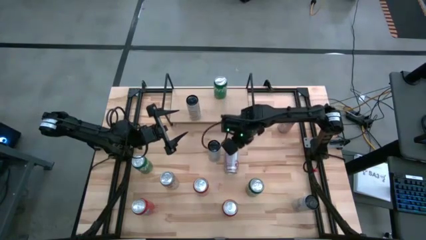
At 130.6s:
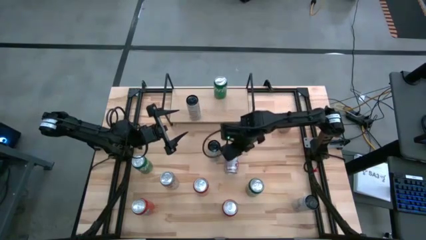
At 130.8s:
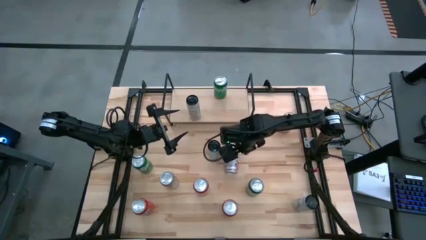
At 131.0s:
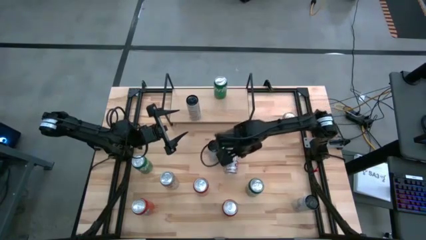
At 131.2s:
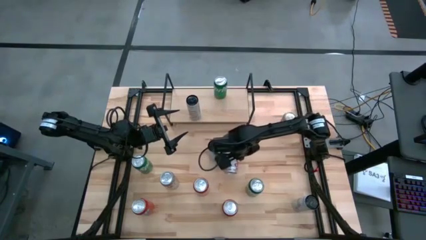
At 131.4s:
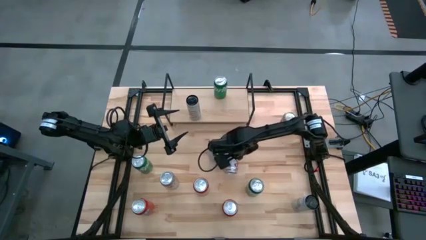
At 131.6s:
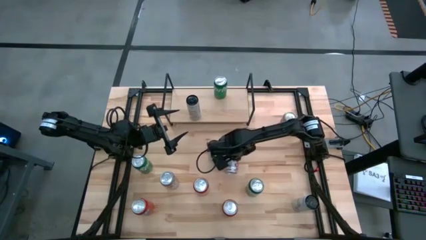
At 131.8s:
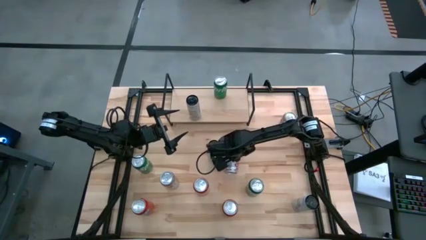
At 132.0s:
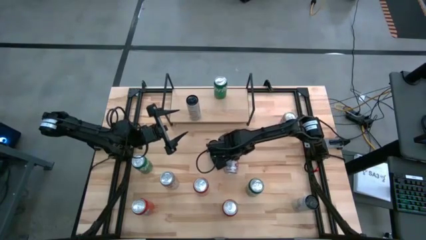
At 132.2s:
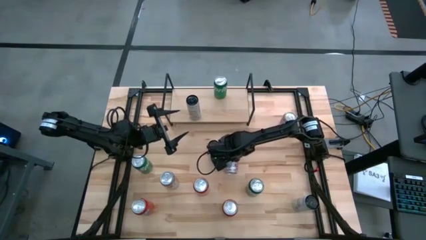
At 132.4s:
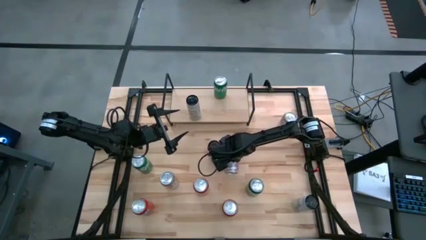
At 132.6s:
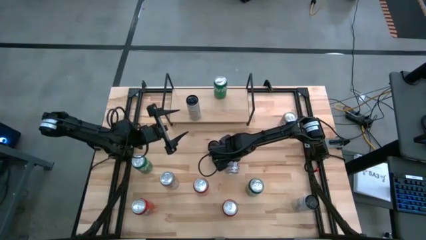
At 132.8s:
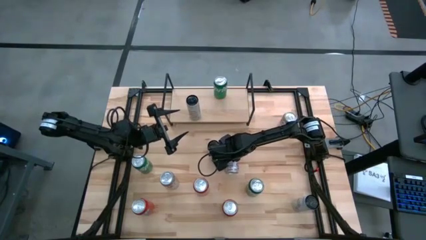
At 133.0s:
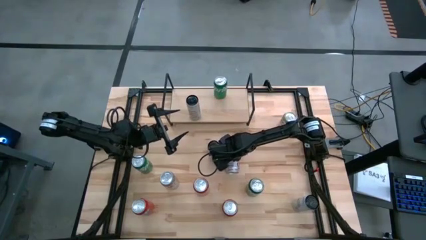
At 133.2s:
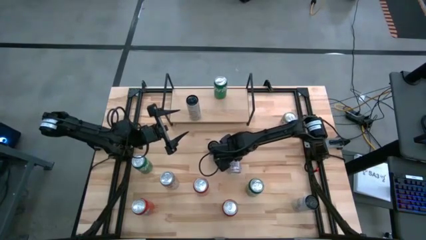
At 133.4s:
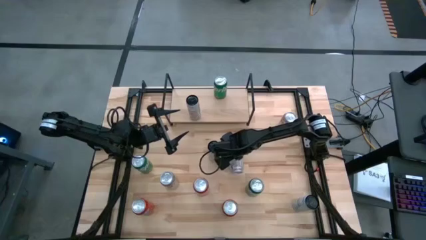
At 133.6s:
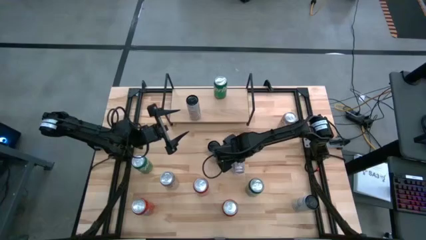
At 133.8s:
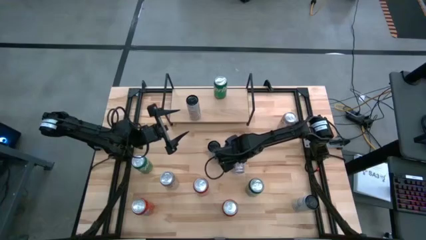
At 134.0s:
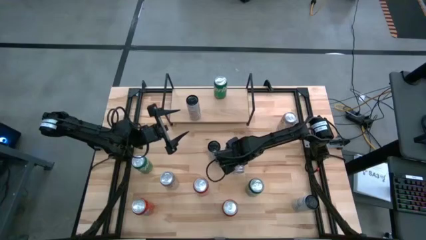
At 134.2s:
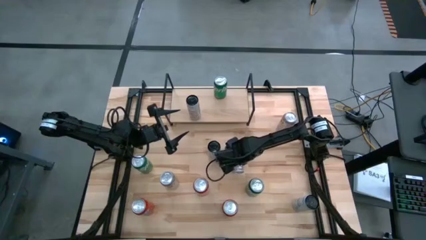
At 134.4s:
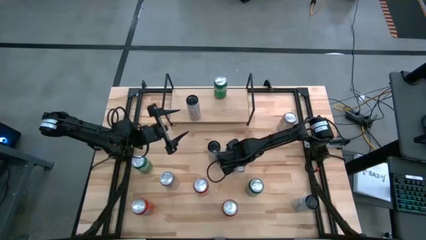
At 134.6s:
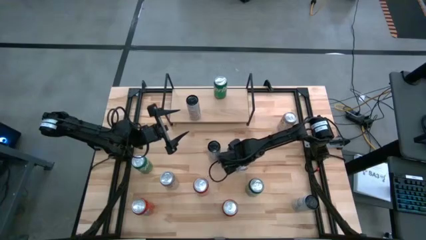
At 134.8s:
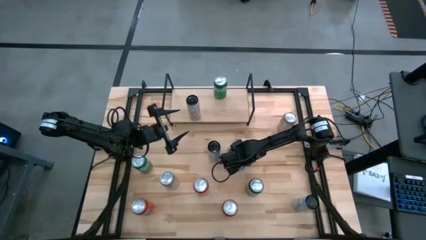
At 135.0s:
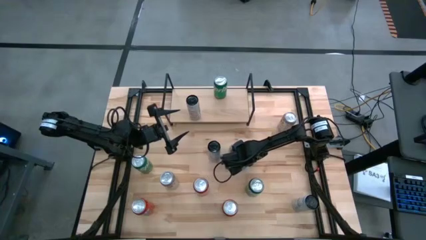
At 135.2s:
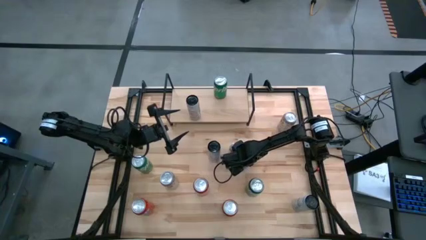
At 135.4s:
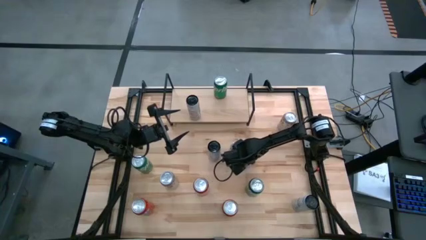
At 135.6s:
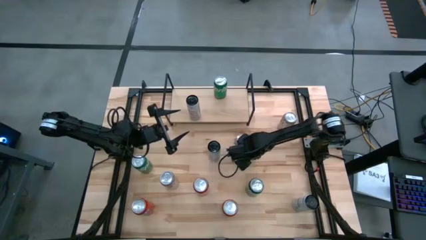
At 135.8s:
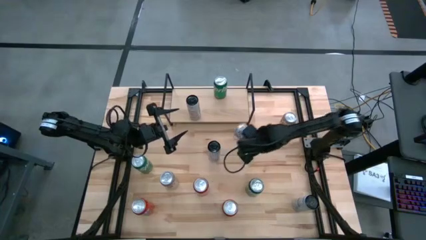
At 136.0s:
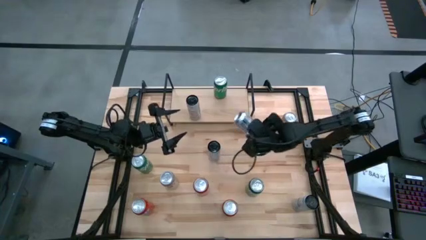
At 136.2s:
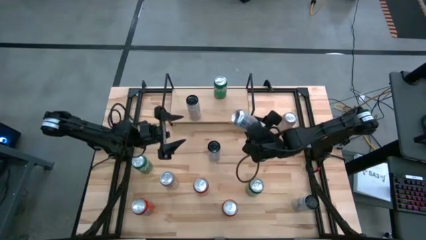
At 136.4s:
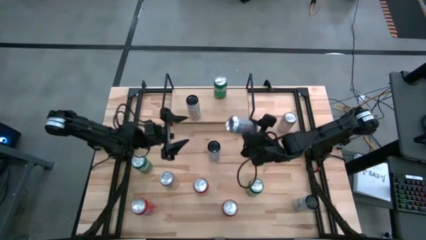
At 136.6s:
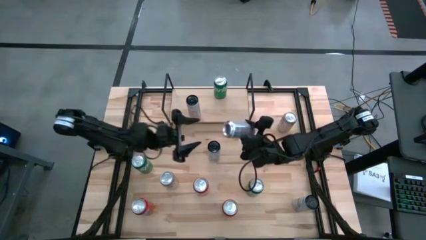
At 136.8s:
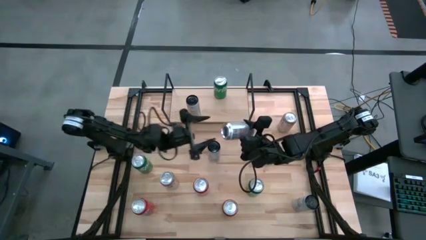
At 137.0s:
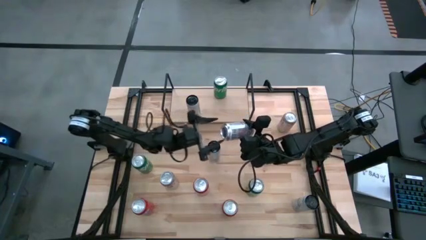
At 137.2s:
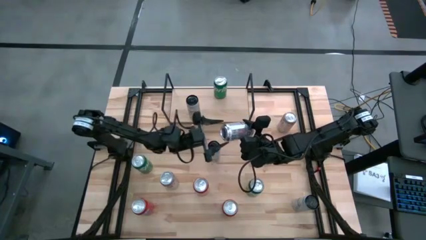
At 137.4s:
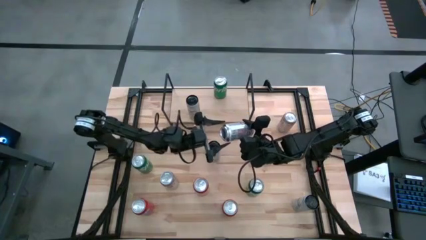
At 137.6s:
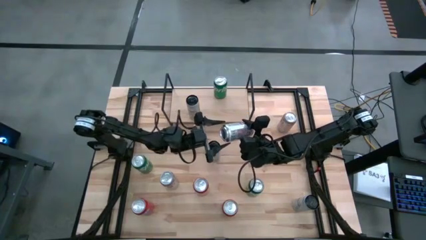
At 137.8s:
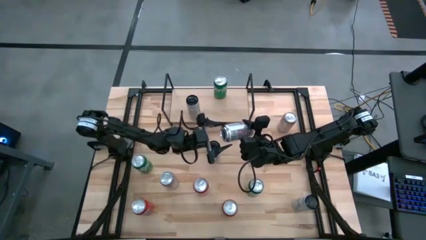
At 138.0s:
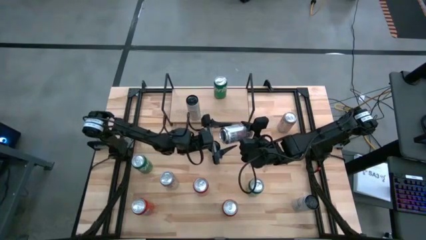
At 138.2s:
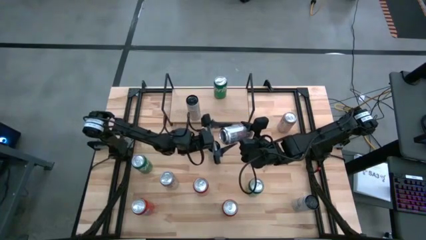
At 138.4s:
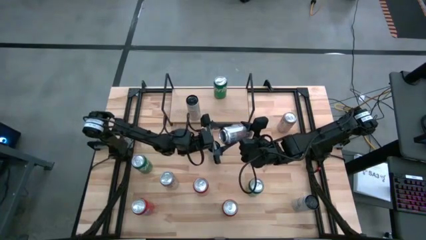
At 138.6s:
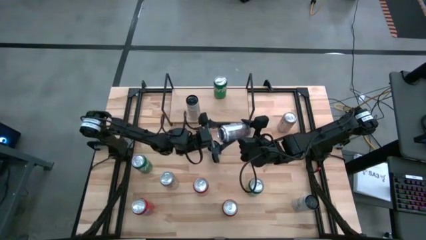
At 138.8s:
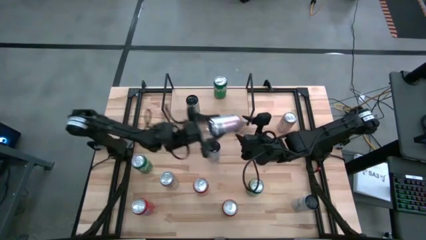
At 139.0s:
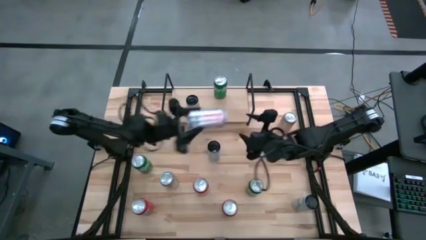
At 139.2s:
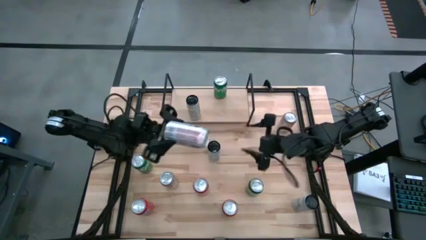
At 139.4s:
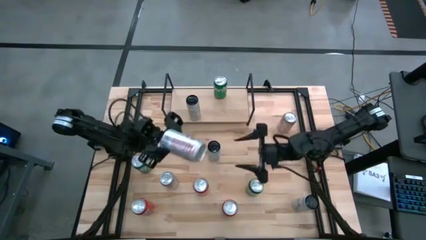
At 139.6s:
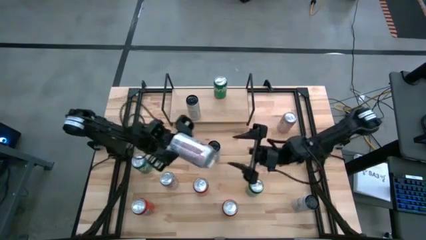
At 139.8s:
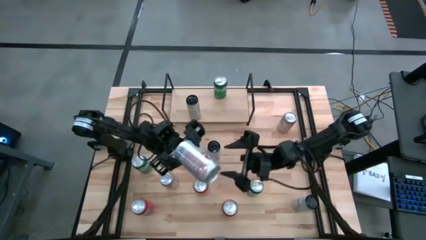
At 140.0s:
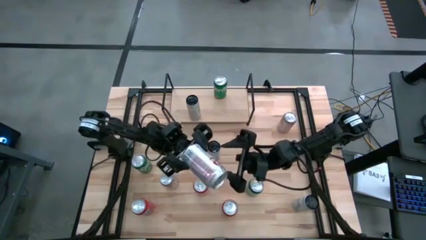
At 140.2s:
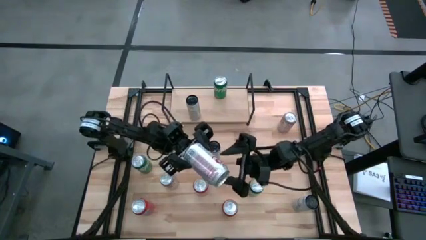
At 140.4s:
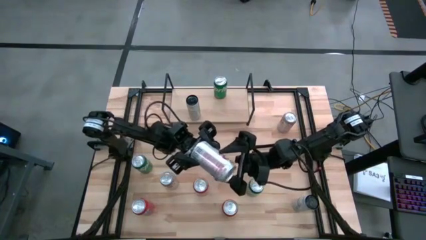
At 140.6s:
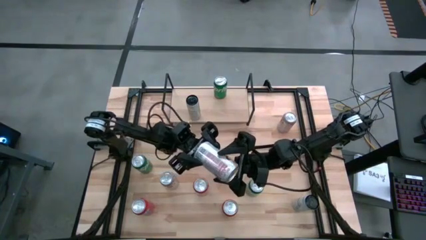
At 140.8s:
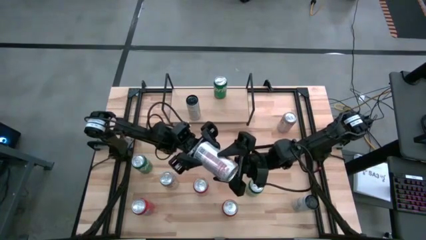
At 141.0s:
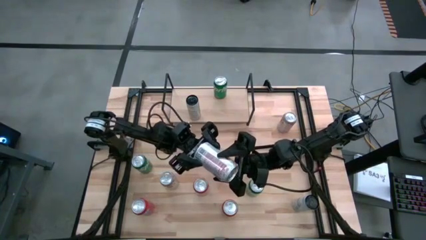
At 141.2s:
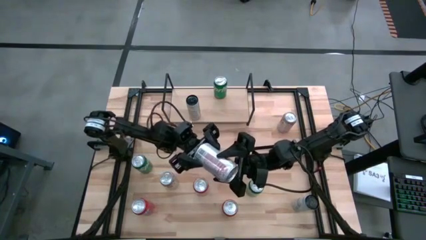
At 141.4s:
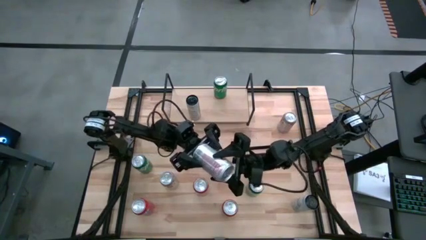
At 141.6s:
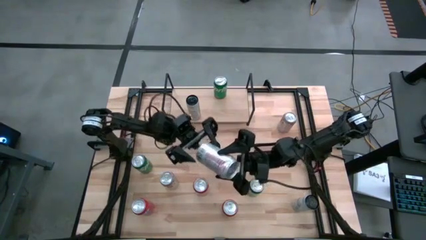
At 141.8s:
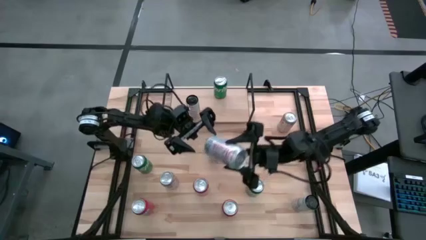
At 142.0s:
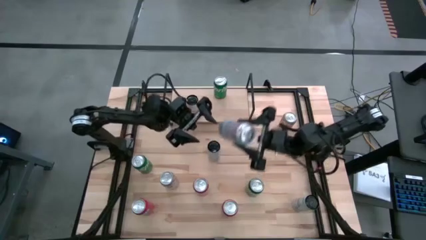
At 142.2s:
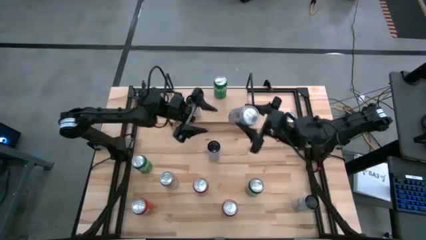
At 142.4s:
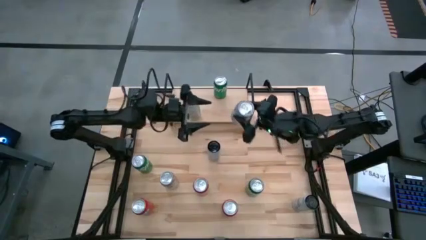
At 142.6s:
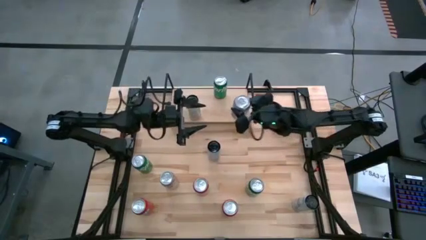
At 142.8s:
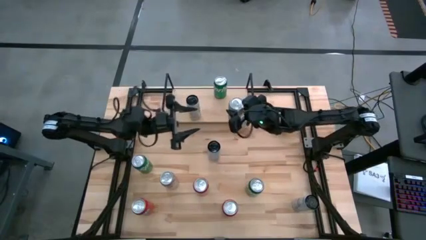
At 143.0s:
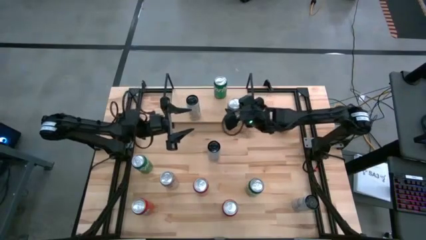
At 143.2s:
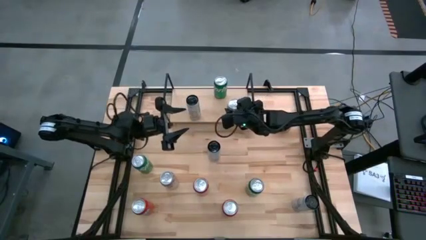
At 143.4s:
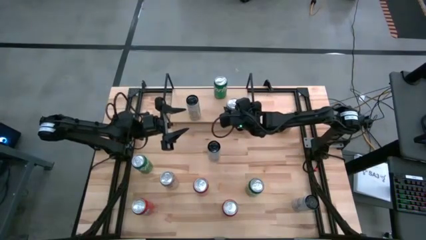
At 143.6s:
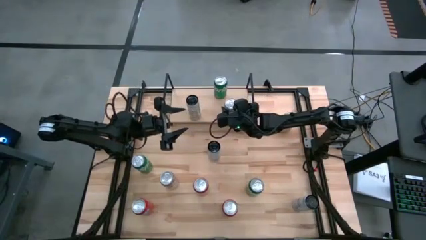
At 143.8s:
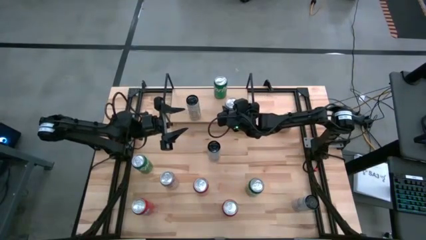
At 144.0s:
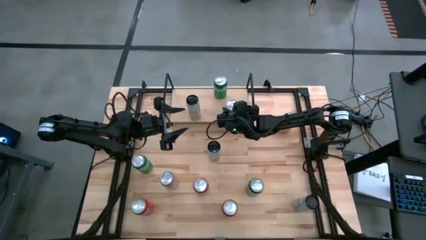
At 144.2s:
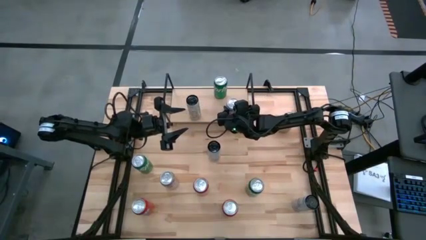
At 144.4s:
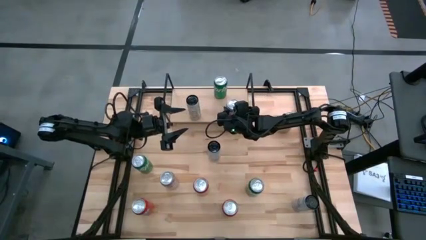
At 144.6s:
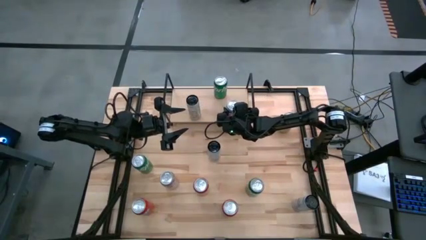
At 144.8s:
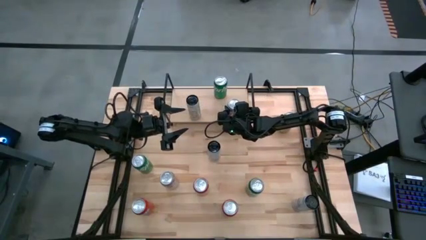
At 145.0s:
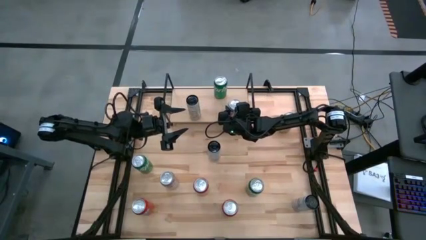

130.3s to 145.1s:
Task: Sort soda cans
Put the middle red silver soda can on the shelf
